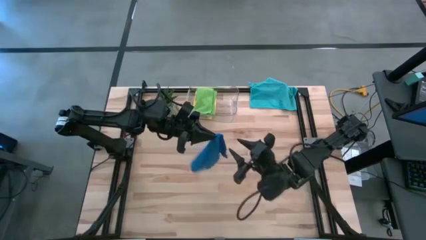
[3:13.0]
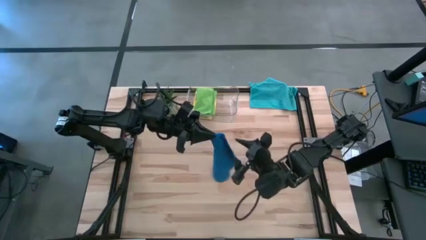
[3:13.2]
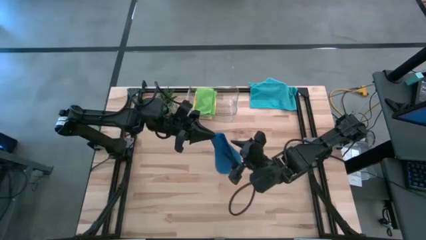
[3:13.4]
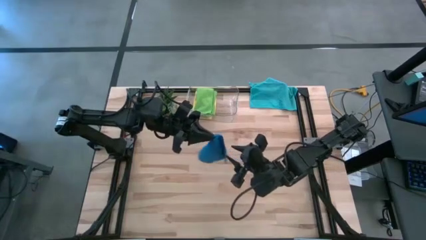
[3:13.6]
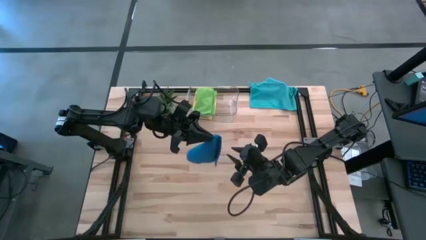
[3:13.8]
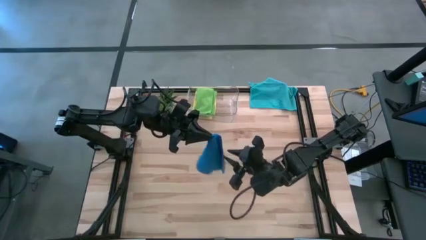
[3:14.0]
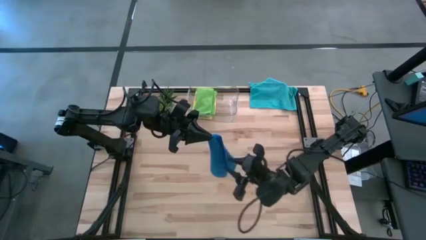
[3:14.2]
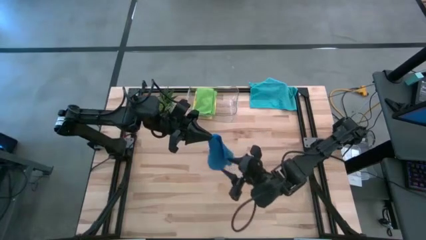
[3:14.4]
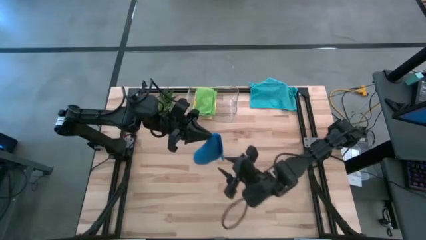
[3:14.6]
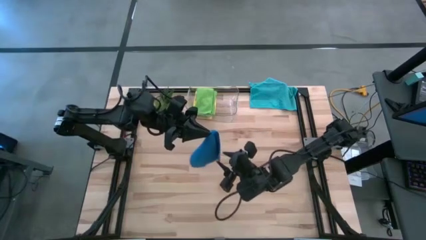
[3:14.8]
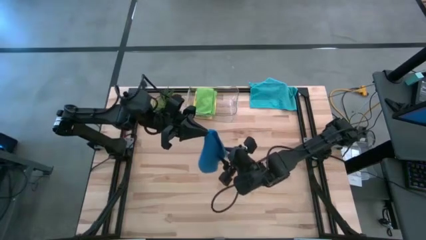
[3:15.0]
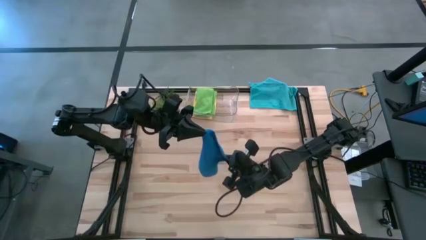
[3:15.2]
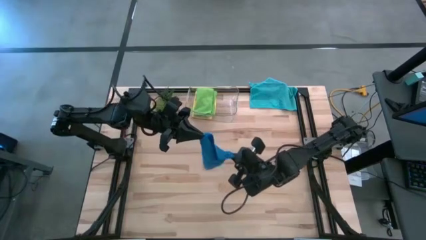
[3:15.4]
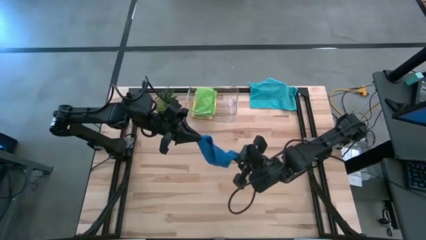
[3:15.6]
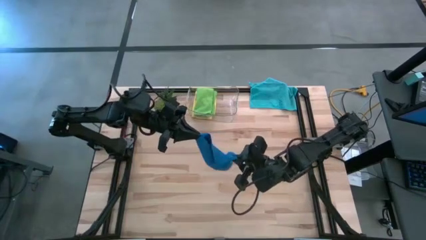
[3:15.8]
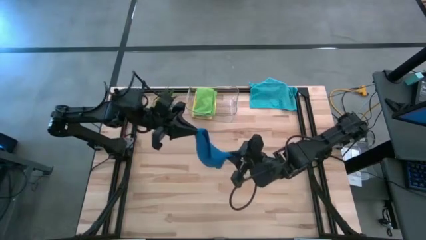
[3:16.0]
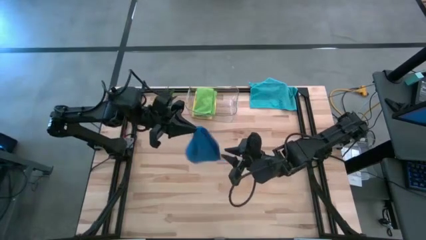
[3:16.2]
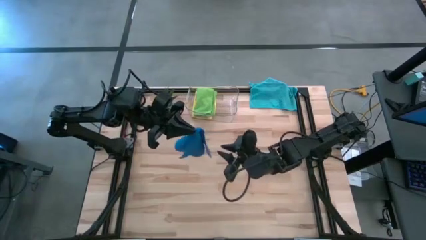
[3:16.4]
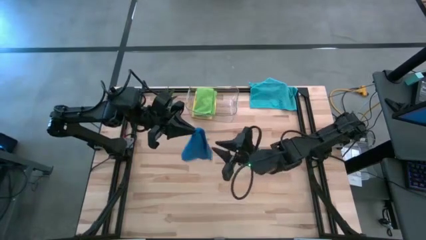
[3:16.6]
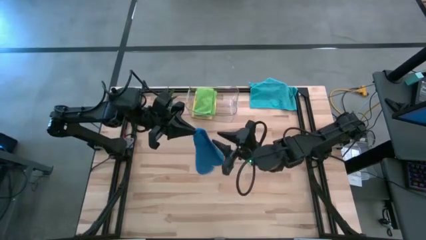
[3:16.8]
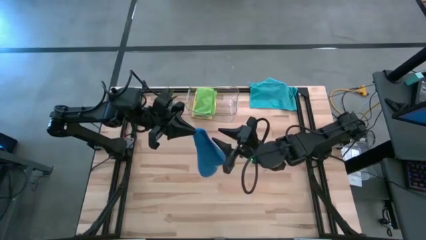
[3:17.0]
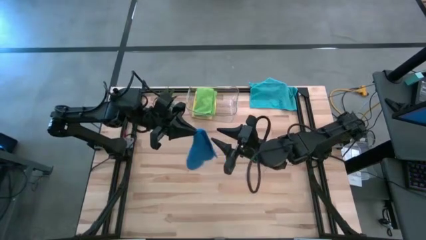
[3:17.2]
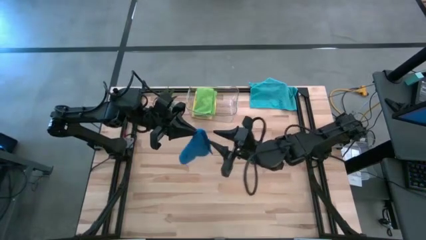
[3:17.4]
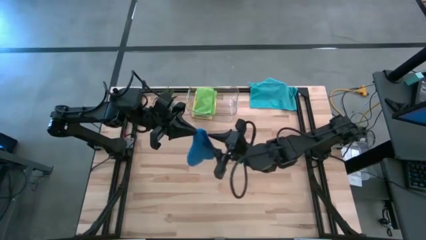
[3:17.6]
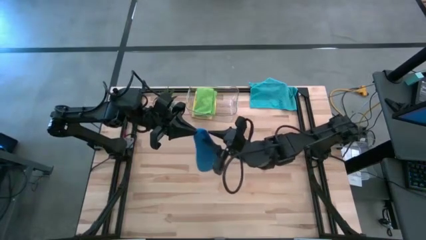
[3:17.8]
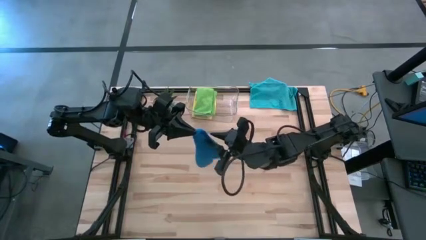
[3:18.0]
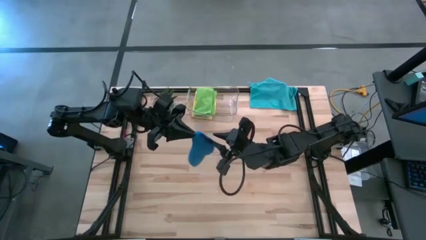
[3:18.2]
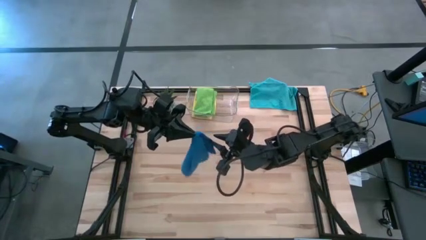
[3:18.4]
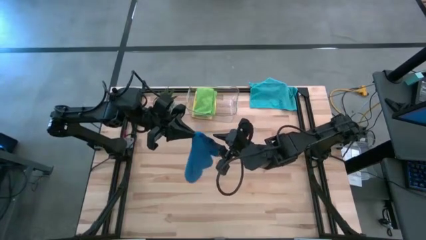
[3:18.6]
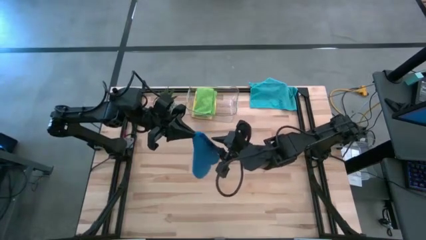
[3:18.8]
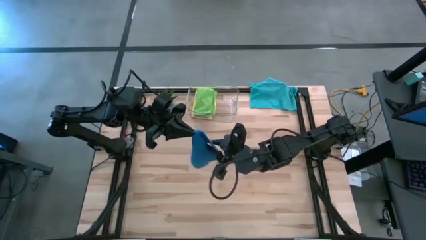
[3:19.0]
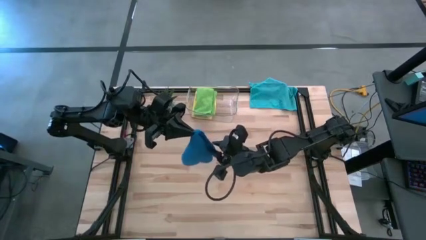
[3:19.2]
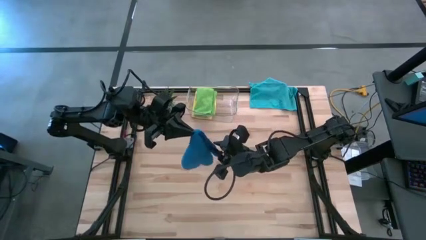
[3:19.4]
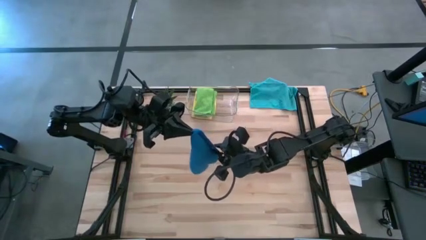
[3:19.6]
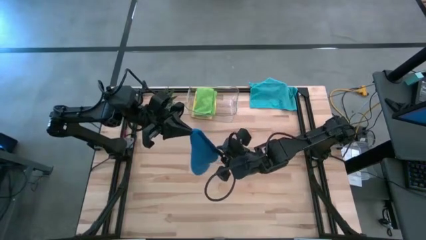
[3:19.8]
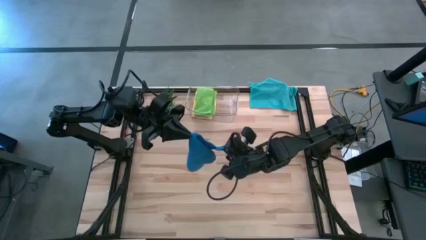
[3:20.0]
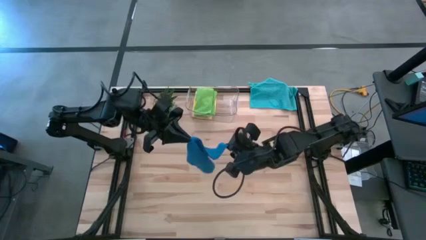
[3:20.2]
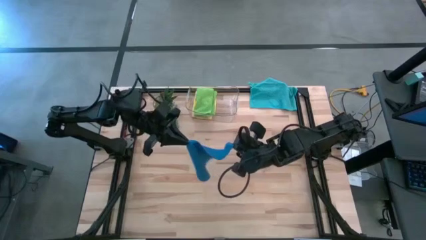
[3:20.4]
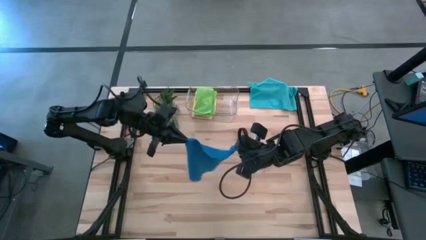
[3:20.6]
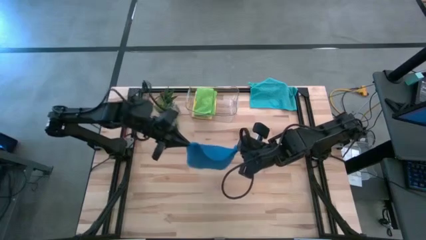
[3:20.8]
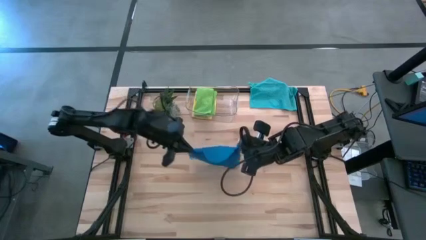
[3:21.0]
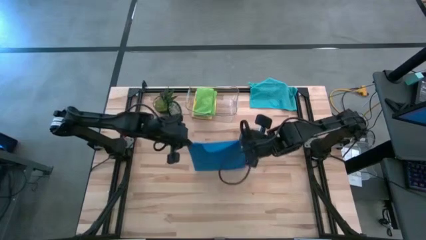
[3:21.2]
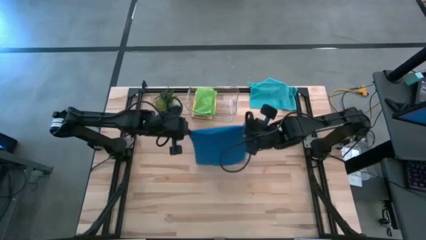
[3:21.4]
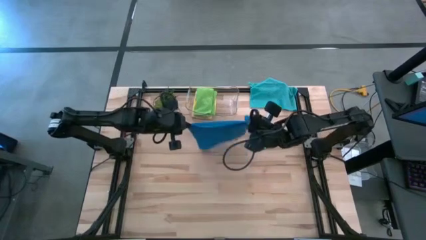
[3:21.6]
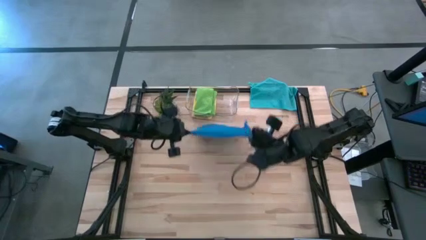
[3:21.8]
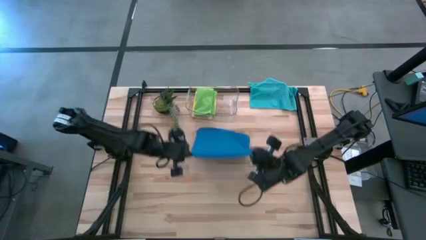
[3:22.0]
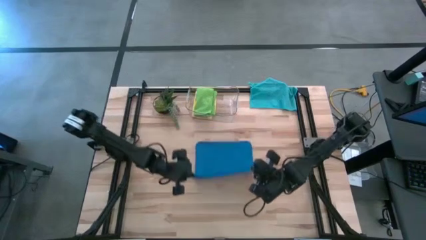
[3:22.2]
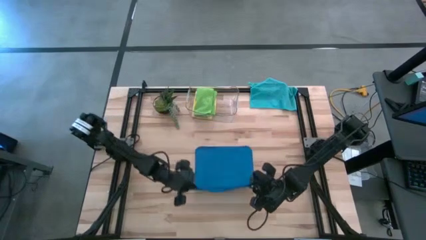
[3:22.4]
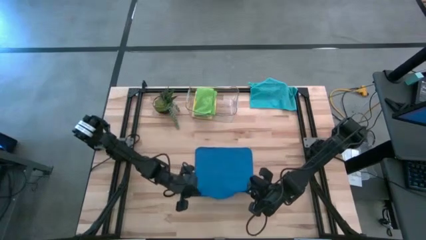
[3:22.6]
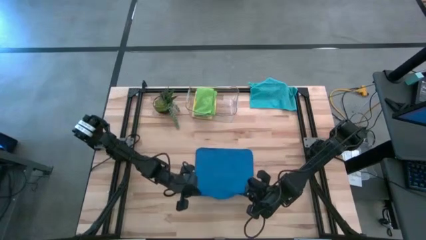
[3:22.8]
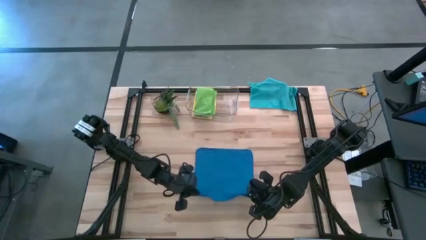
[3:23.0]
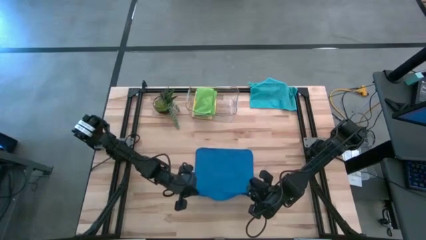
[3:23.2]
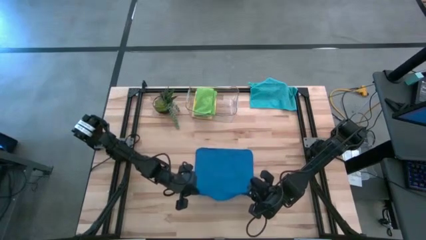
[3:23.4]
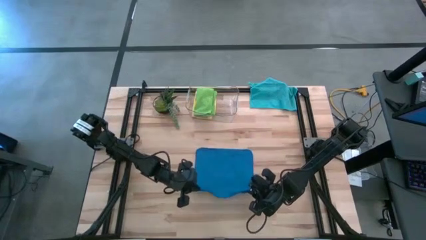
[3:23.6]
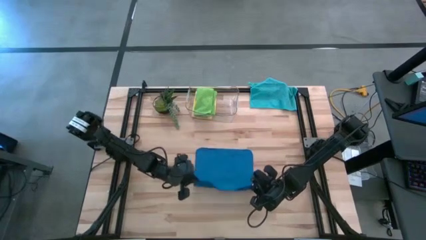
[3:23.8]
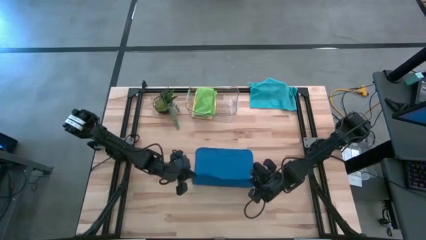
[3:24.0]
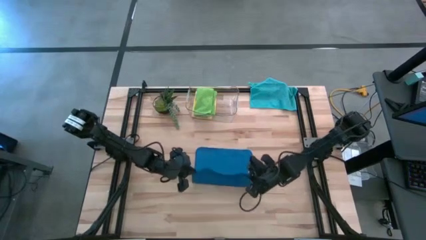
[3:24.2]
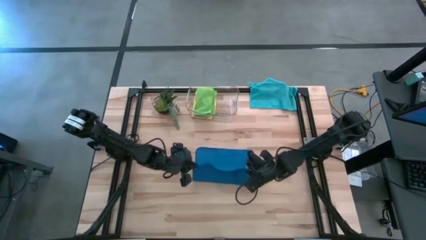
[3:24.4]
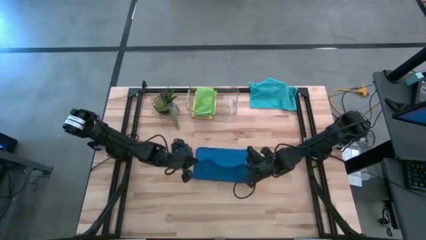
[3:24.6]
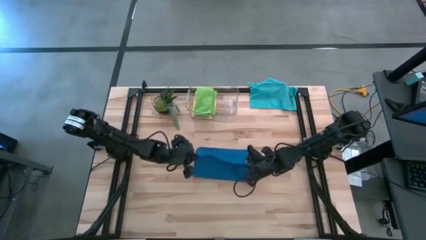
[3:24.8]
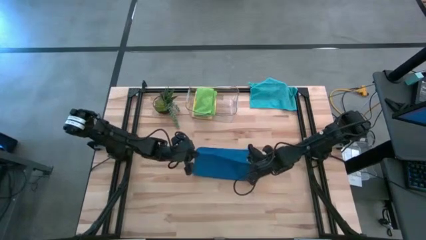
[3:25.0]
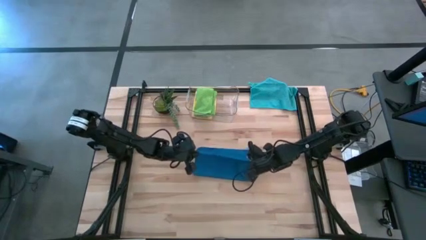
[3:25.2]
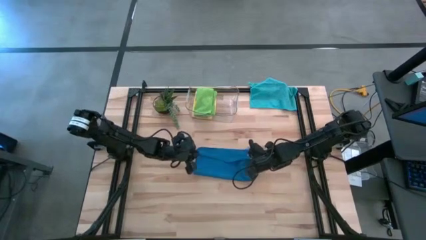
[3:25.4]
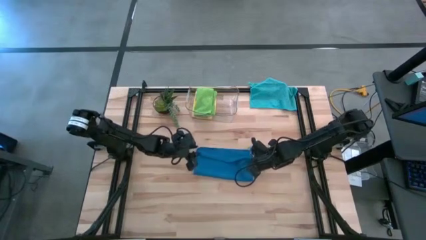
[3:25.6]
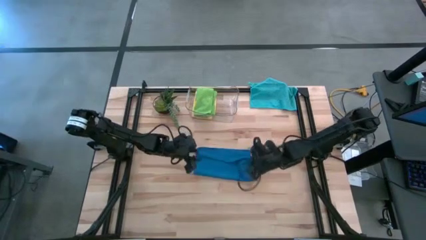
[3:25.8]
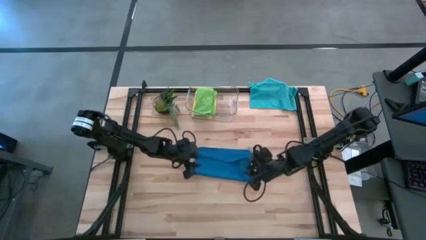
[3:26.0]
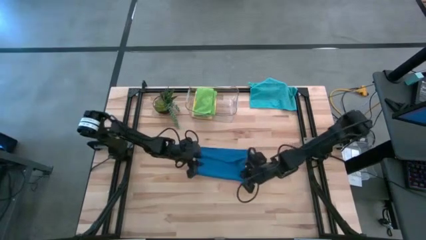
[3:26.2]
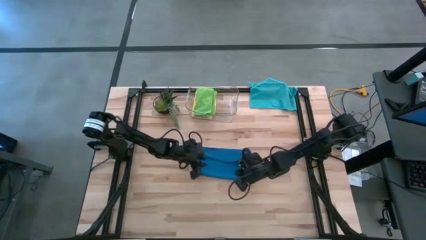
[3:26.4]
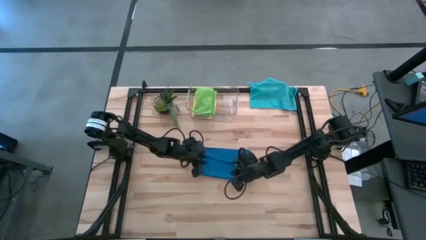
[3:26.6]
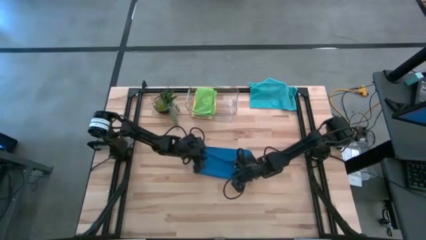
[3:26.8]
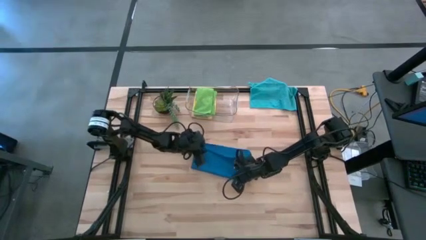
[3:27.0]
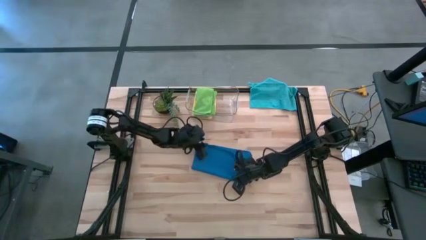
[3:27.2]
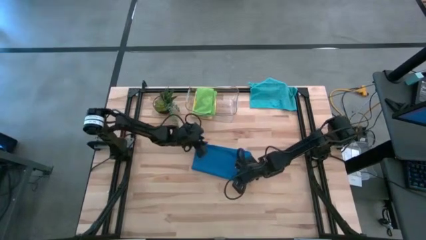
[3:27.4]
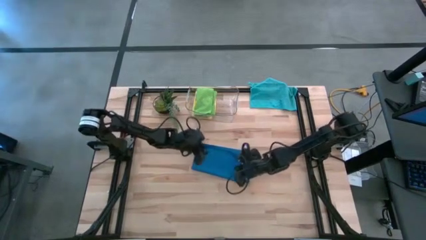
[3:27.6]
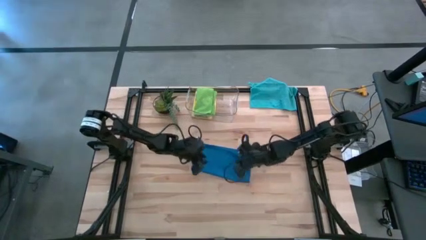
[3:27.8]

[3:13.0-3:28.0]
Task: Fold microfiber towels
Fold the bottom blue towel

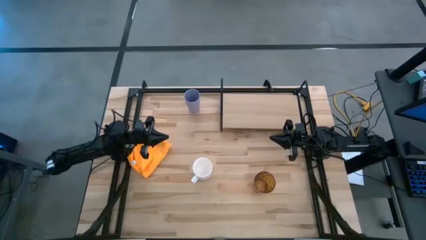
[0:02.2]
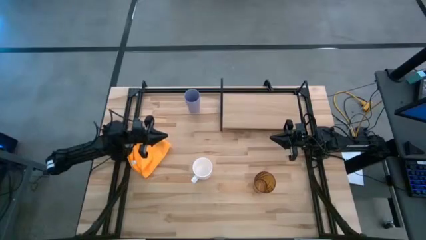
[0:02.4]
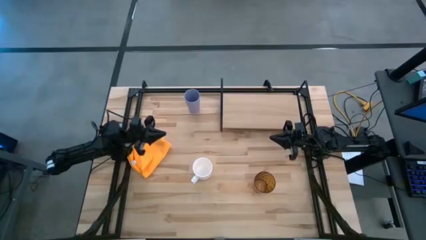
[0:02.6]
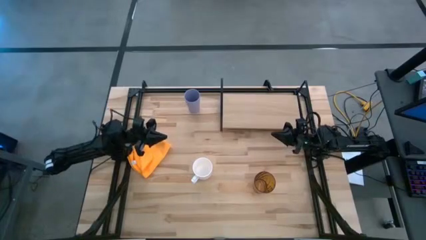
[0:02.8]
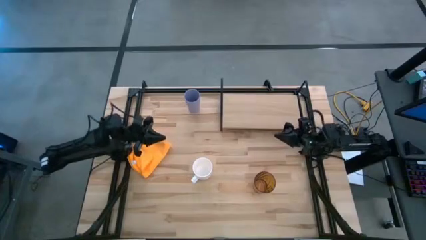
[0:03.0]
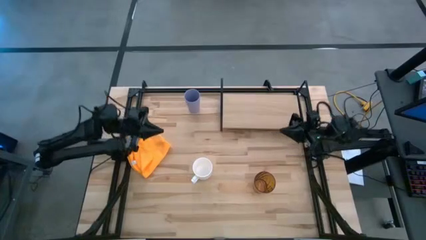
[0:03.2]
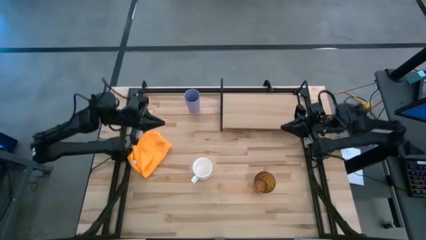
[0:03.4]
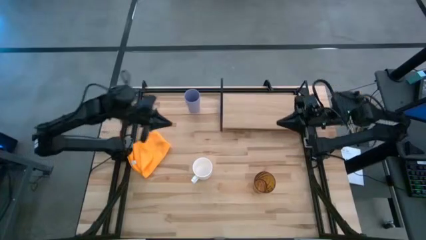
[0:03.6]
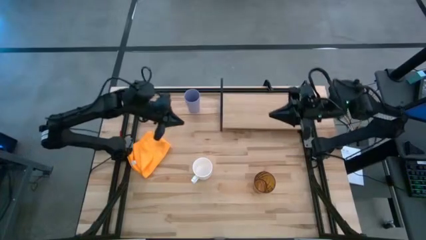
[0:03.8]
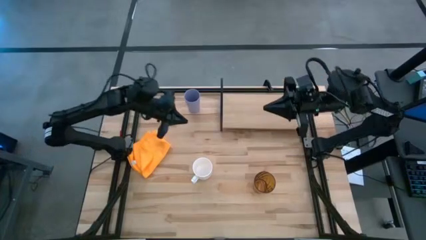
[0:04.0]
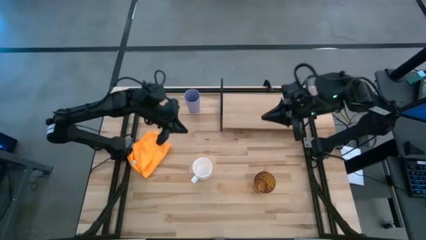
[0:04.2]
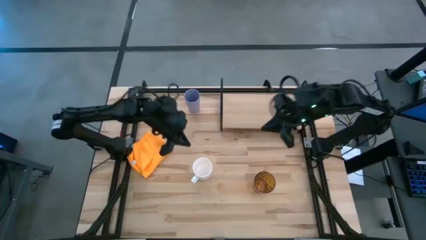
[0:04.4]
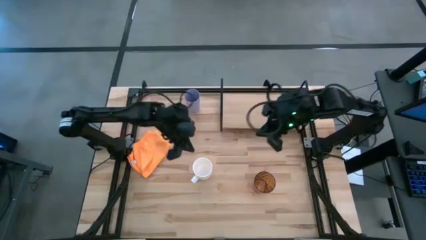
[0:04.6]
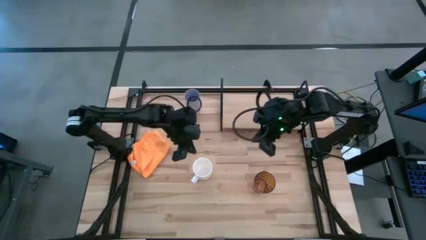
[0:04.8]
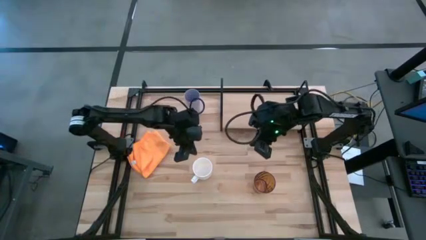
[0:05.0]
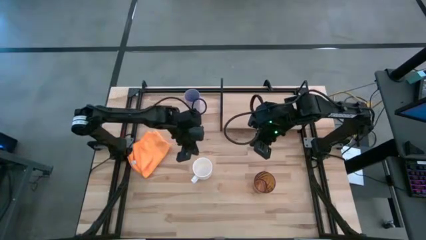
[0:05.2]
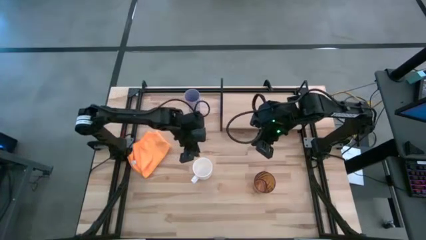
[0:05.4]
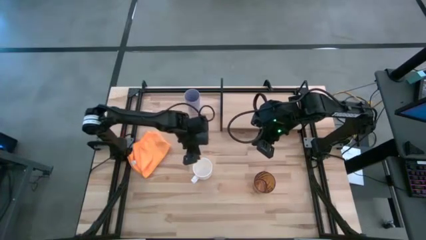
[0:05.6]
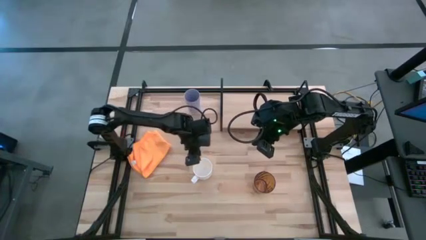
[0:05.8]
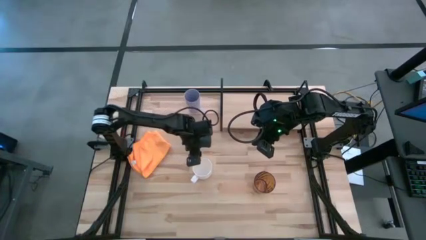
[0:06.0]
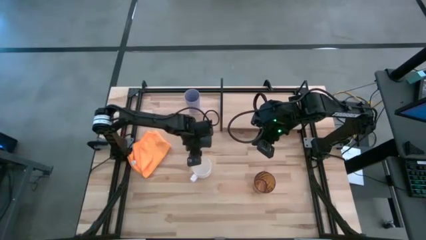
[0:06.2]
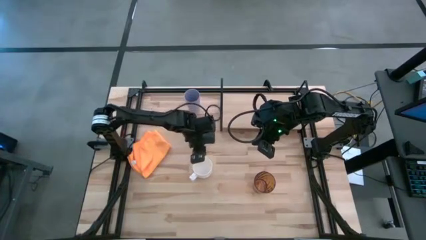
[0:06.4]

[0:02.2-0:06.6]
Task: Stack small to large cups/mugs on shelf
Put the white mug on the shelf
